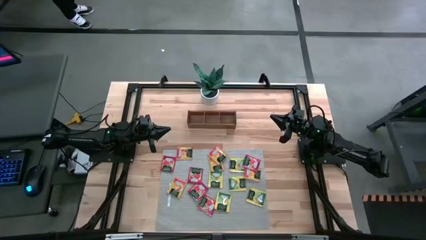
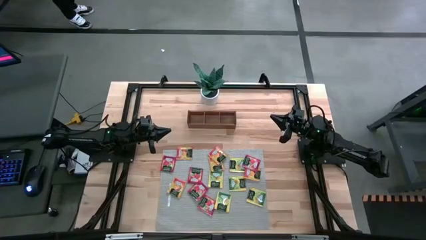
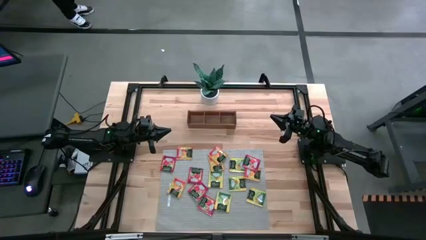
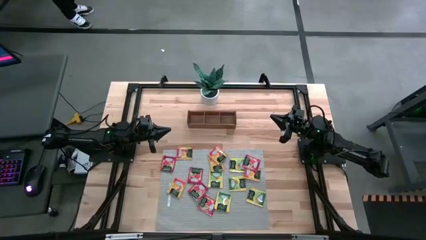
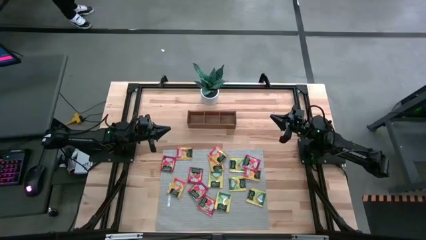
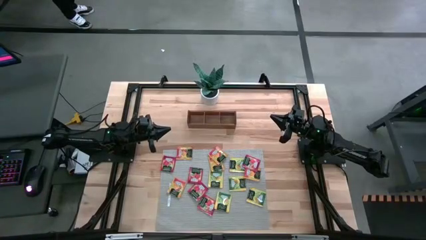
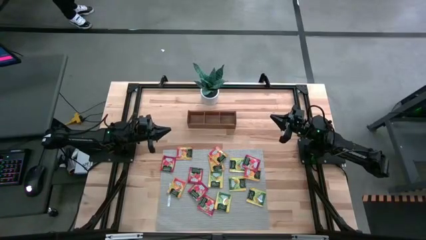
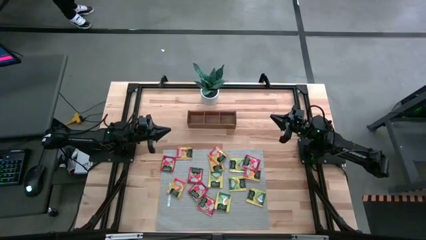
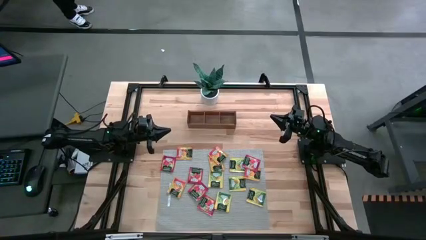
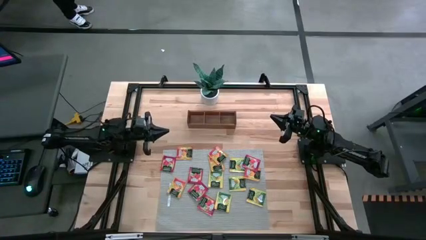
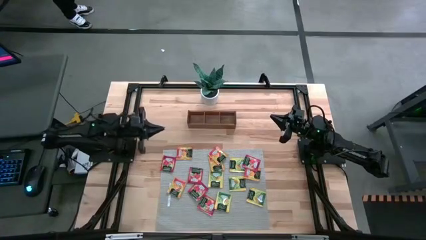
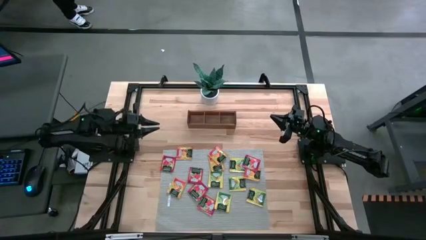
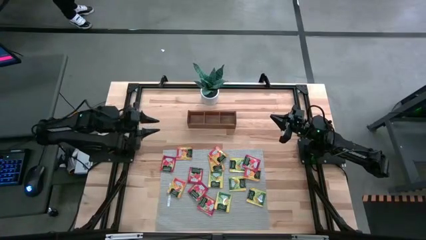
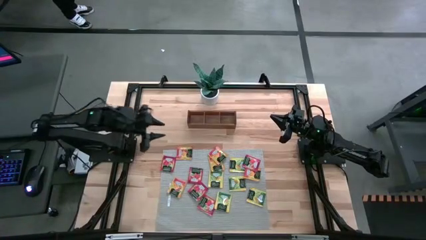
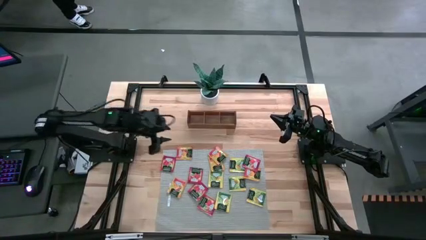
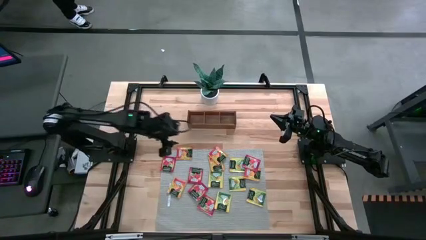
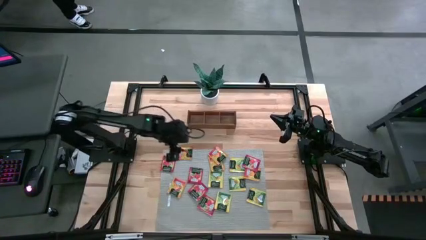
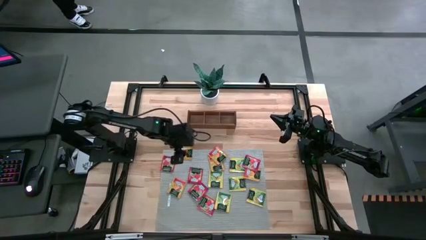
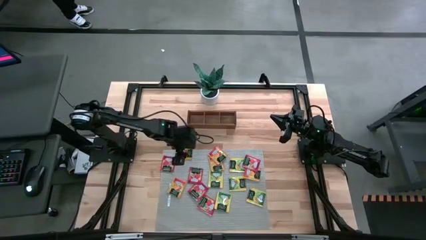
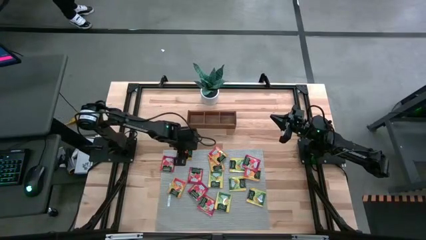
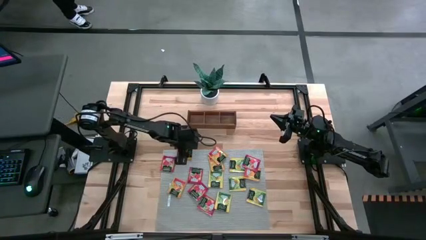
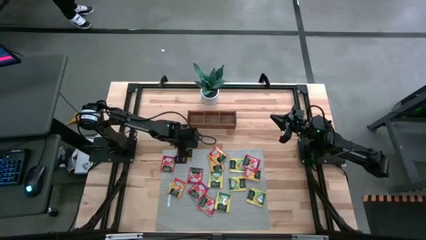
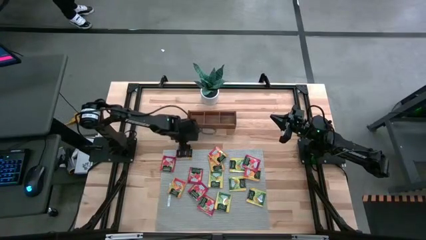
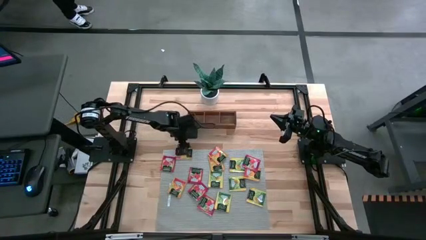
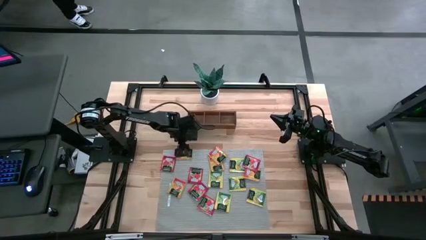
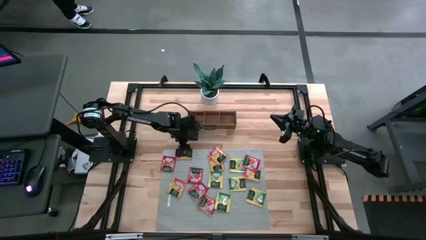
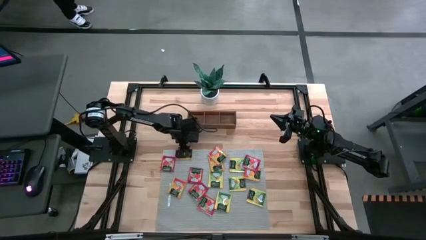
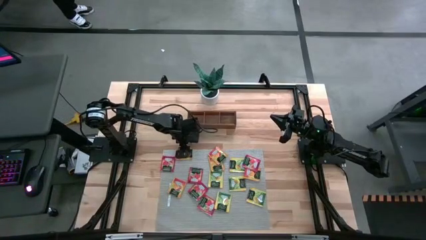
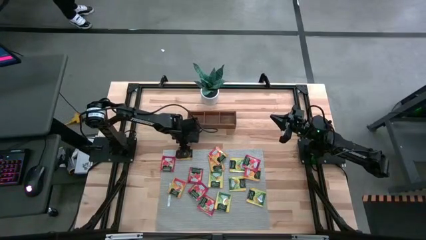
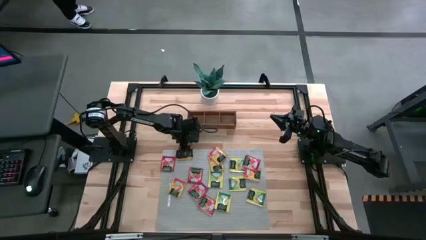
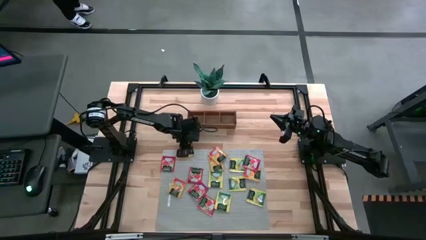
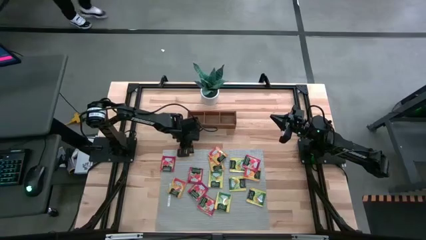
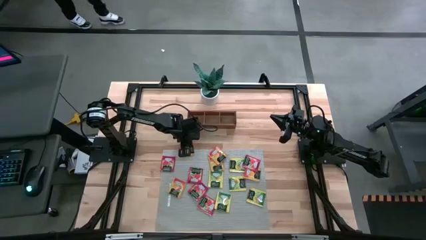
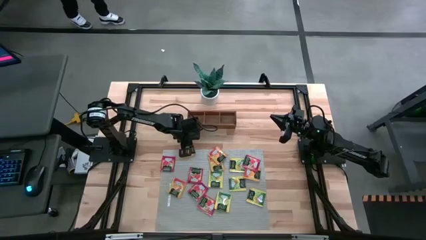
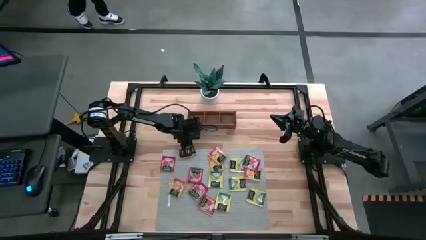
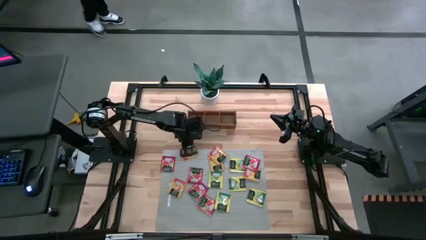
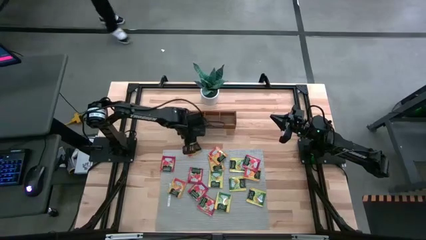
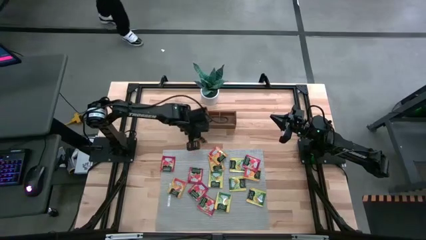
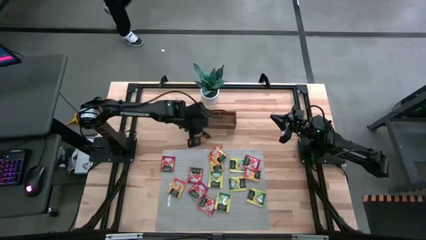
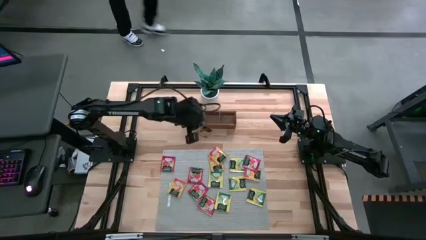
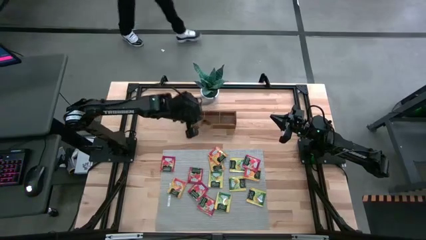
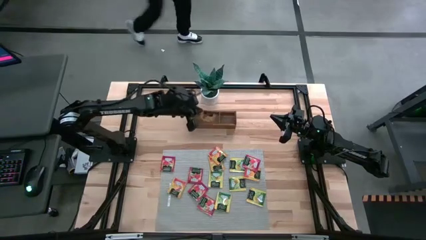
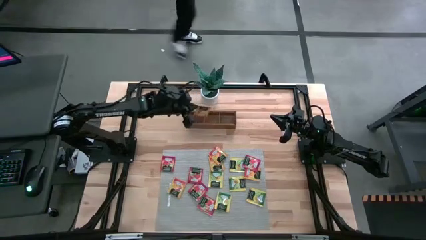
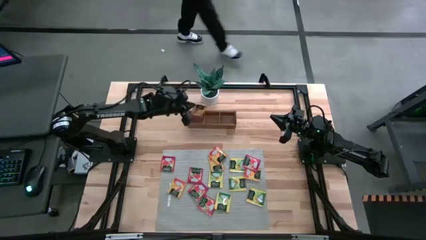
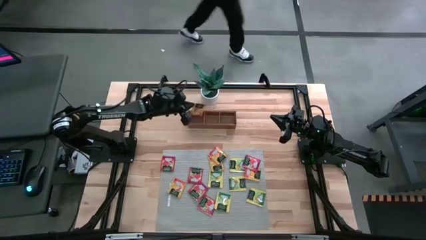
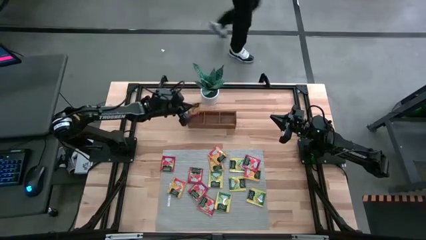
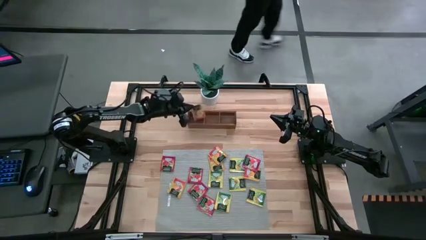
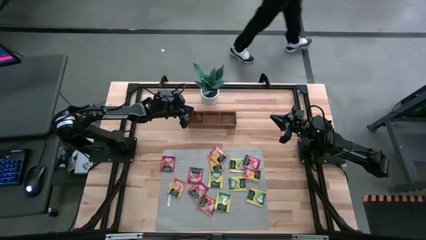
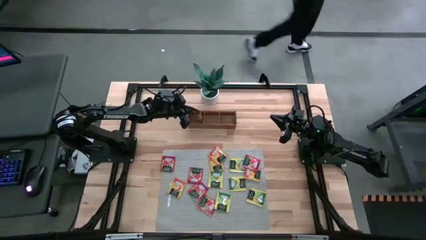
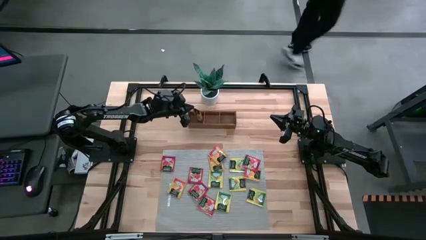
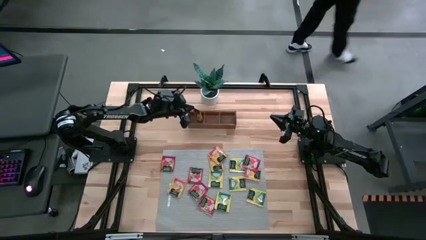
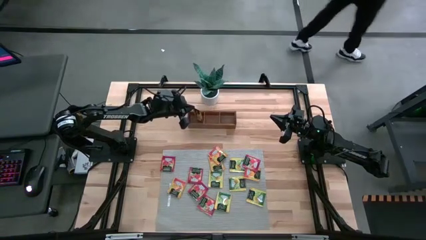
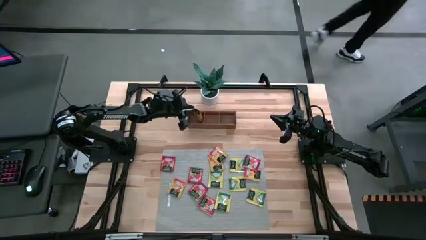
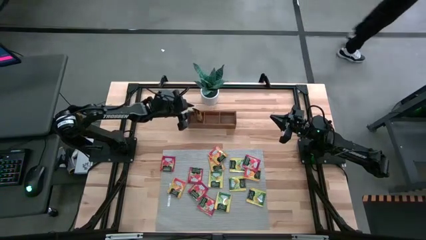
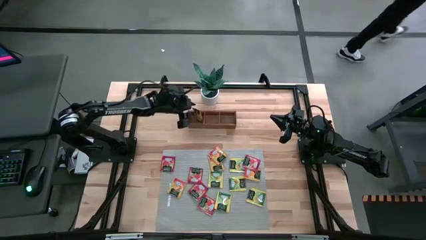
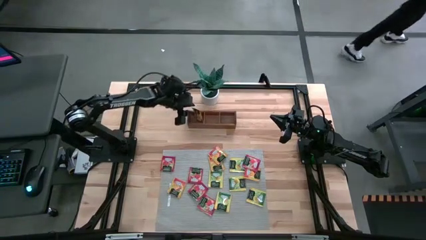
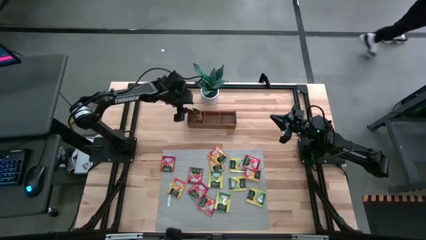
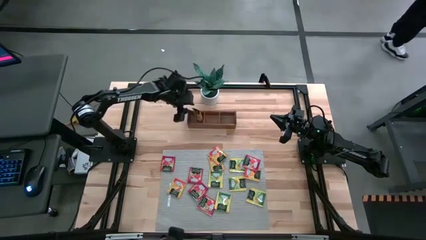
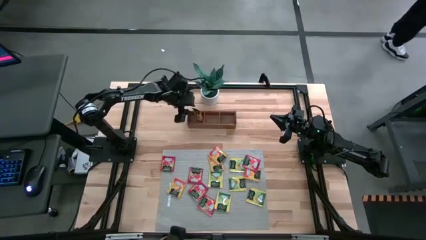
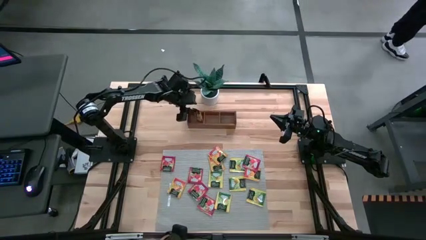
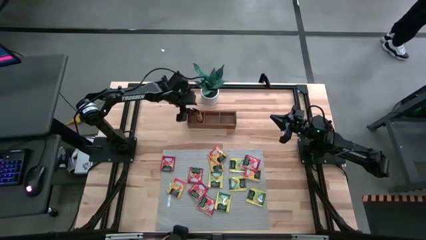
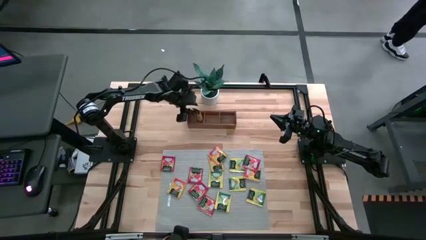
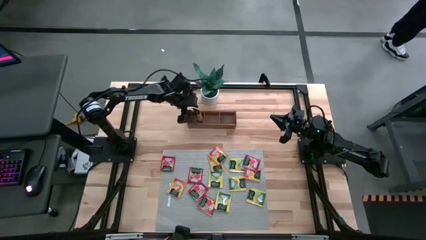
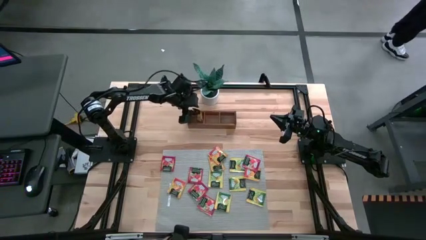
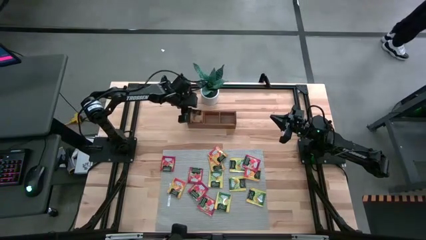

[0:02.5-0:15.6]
Task: Pick & Place Tea
Put the orange tea bag into the left section of the wooden organizer
